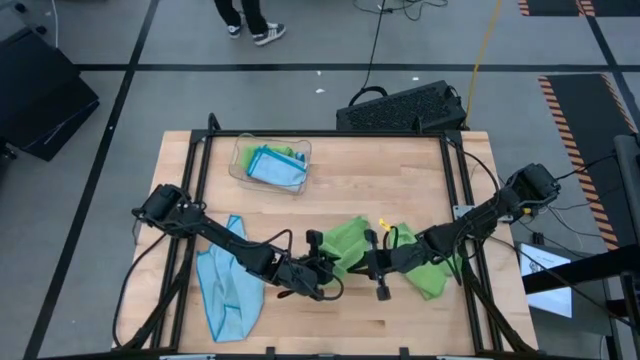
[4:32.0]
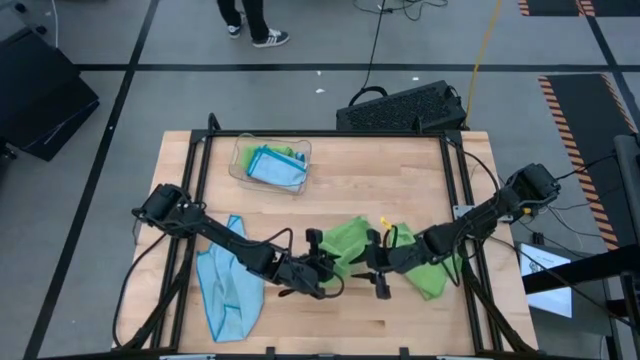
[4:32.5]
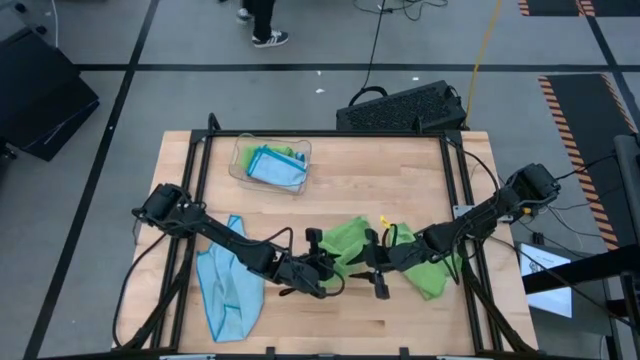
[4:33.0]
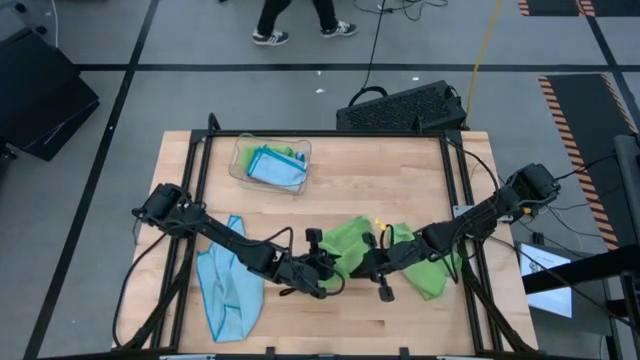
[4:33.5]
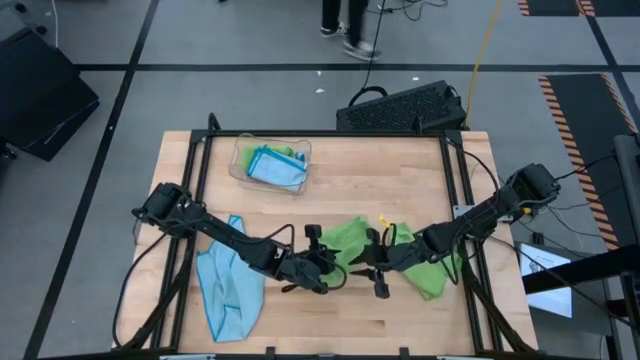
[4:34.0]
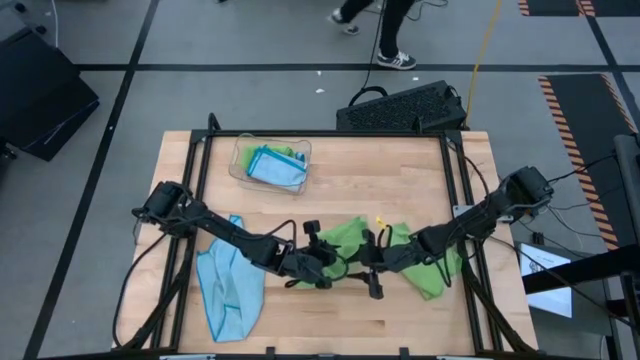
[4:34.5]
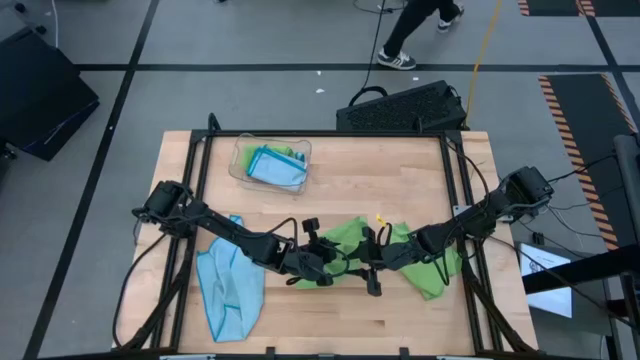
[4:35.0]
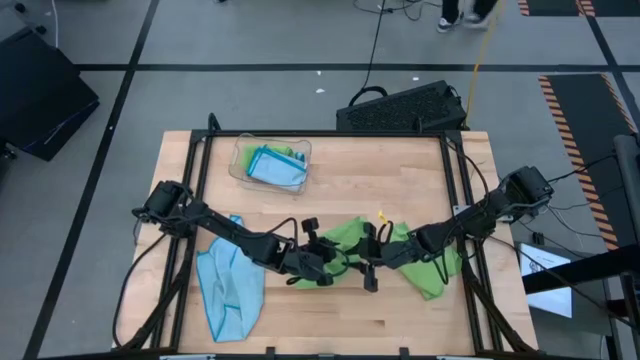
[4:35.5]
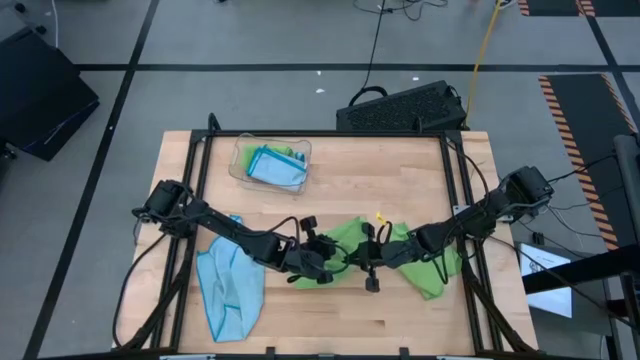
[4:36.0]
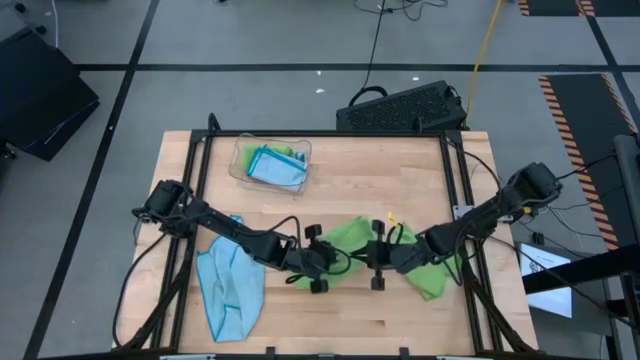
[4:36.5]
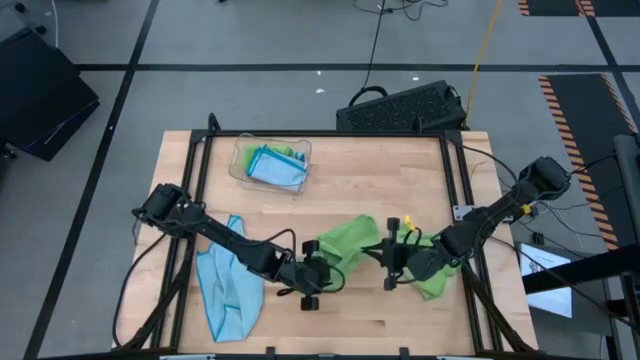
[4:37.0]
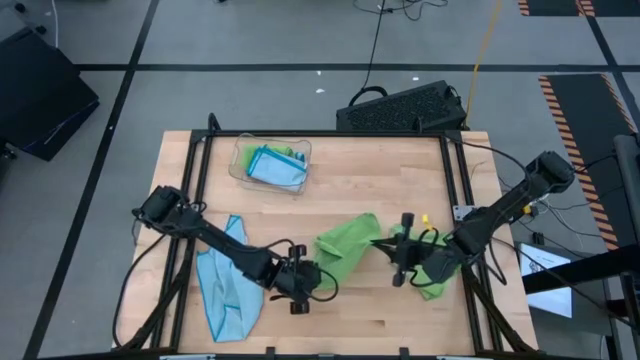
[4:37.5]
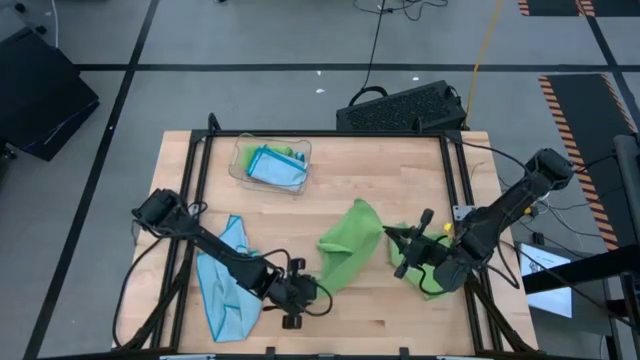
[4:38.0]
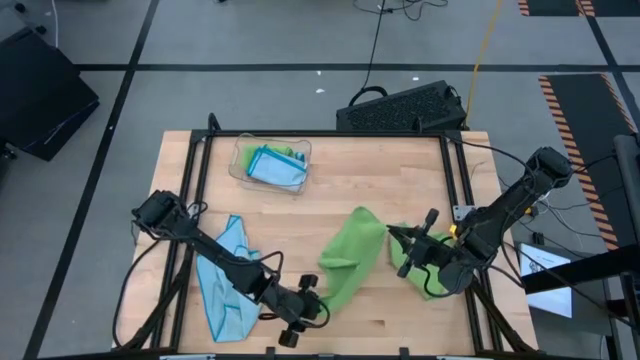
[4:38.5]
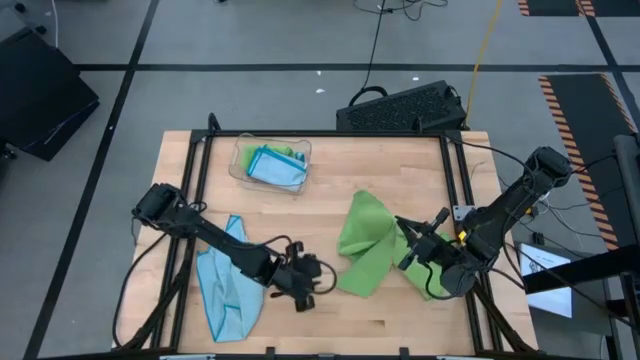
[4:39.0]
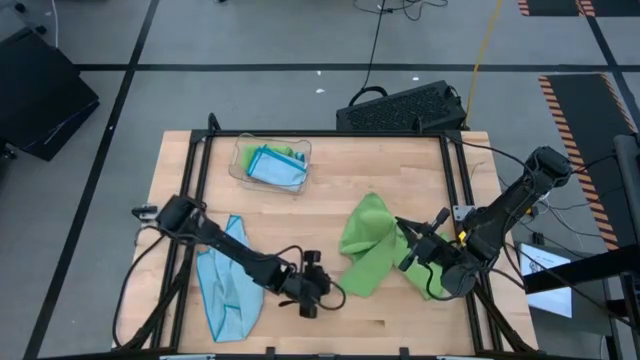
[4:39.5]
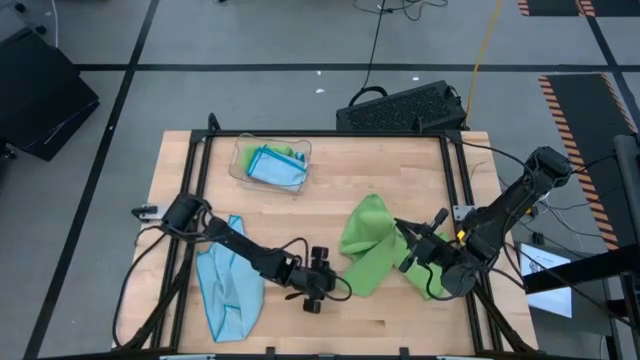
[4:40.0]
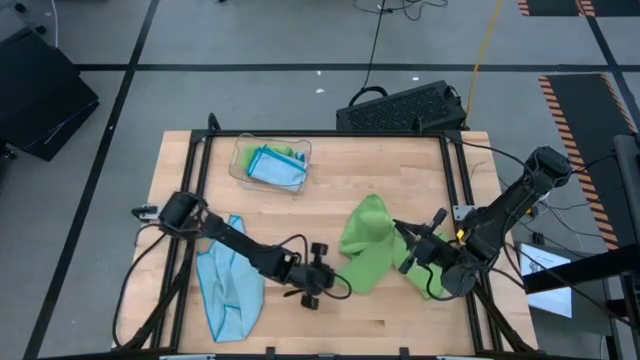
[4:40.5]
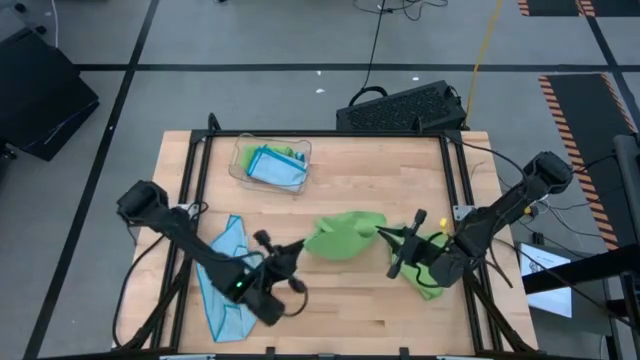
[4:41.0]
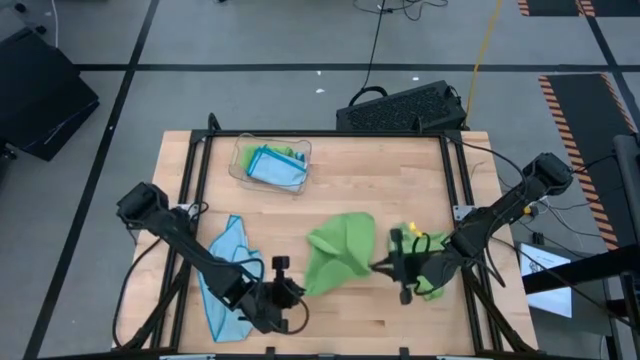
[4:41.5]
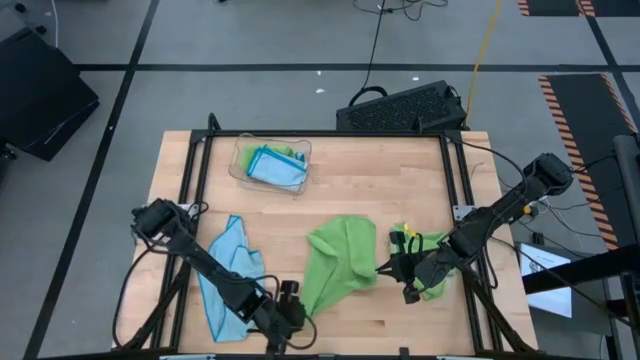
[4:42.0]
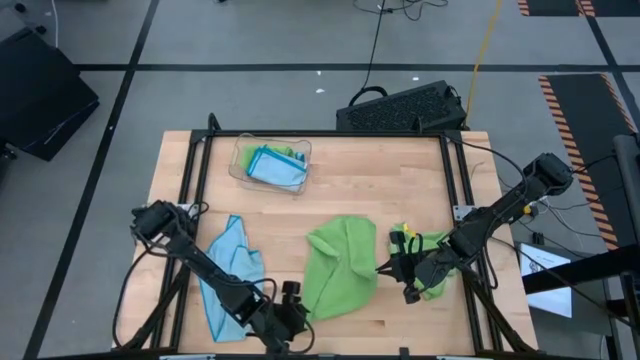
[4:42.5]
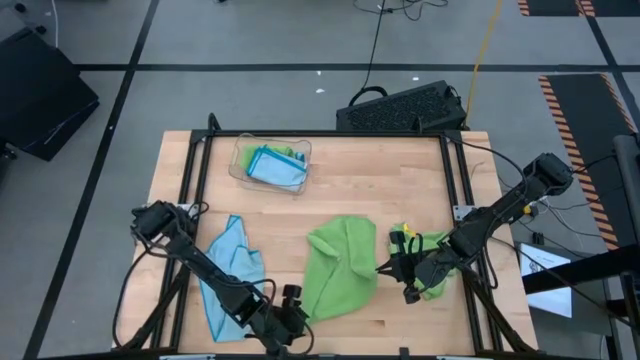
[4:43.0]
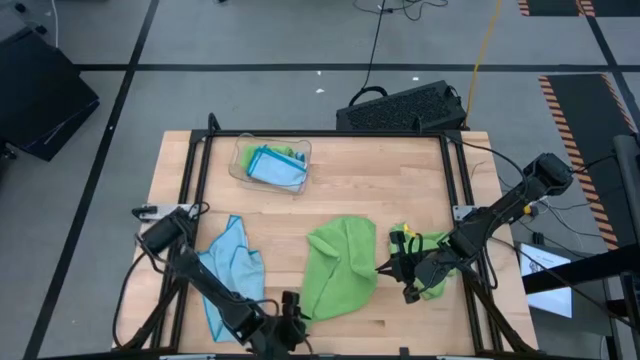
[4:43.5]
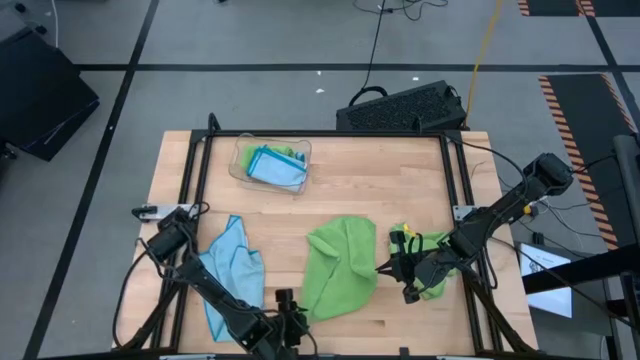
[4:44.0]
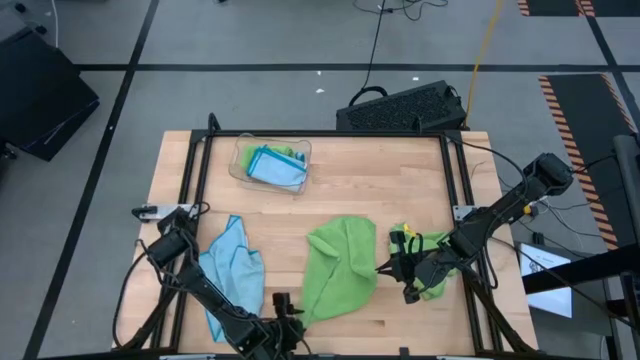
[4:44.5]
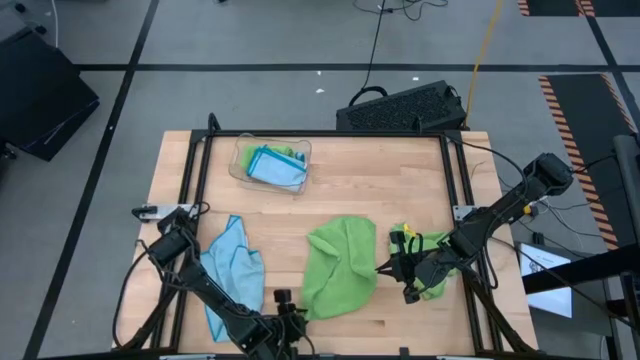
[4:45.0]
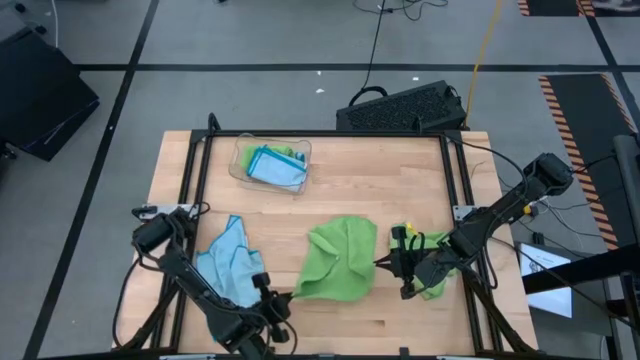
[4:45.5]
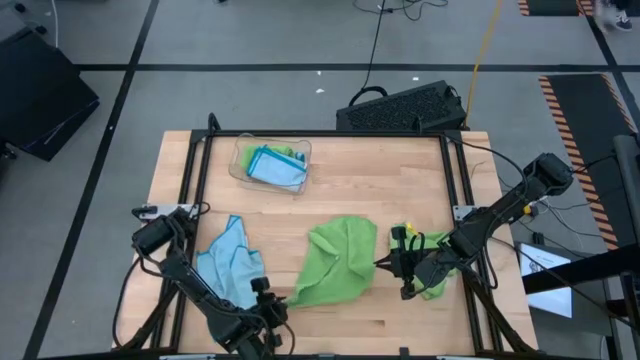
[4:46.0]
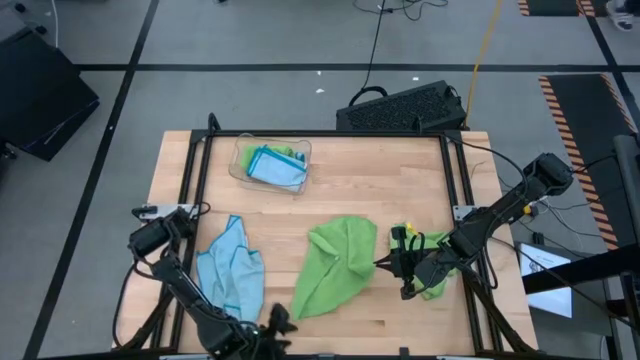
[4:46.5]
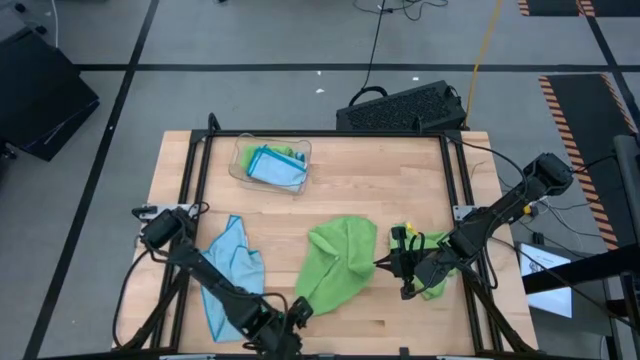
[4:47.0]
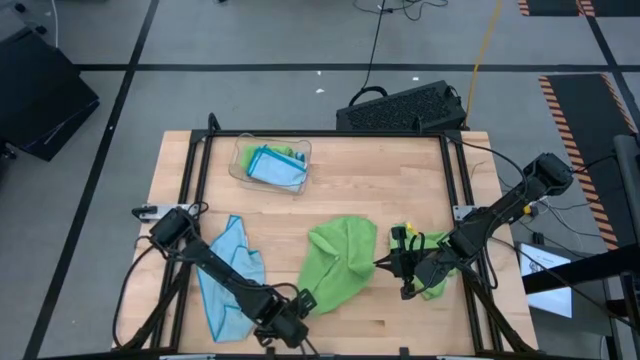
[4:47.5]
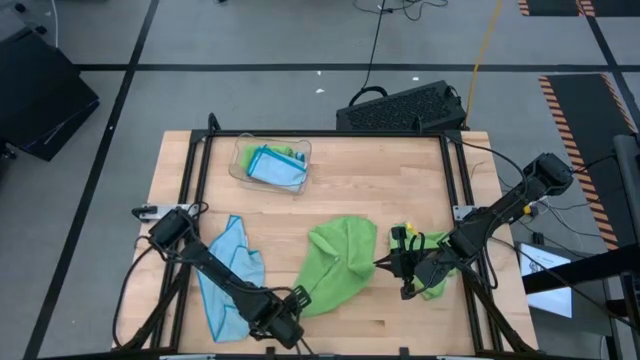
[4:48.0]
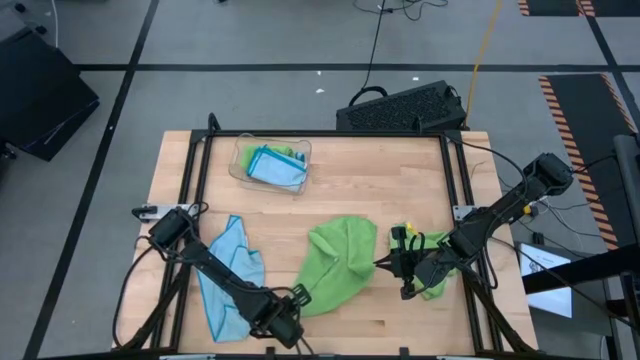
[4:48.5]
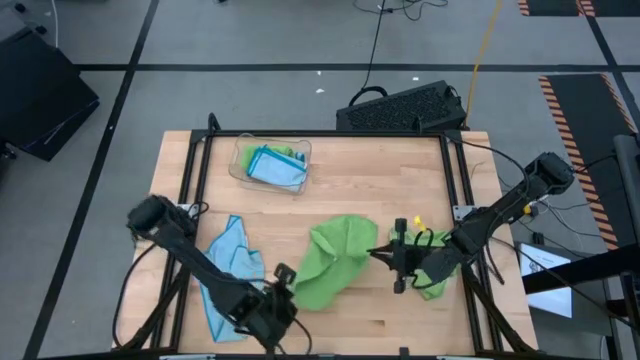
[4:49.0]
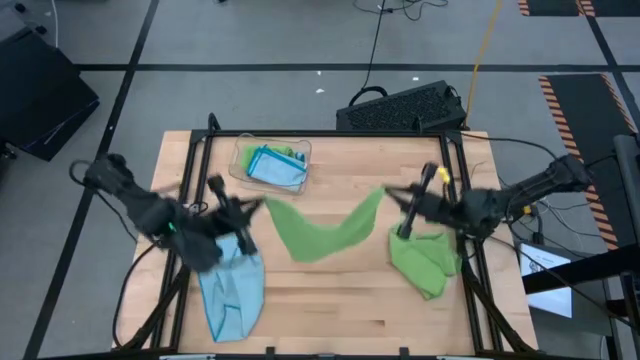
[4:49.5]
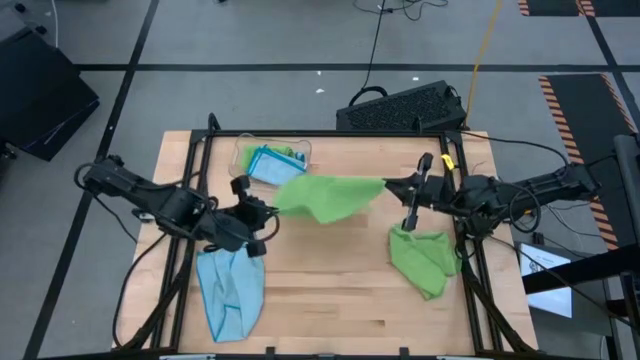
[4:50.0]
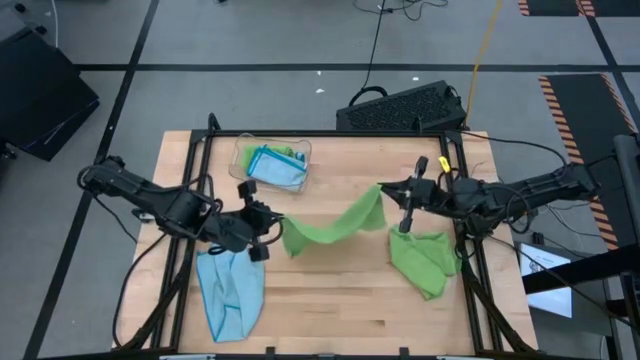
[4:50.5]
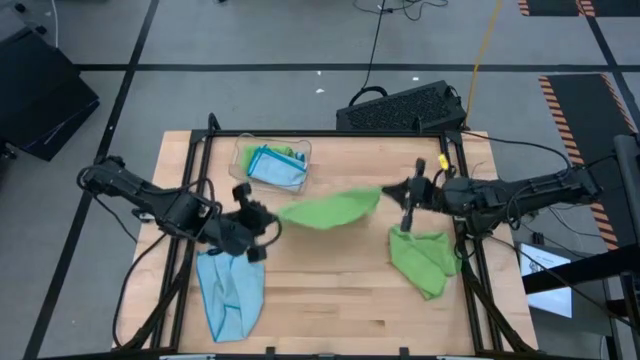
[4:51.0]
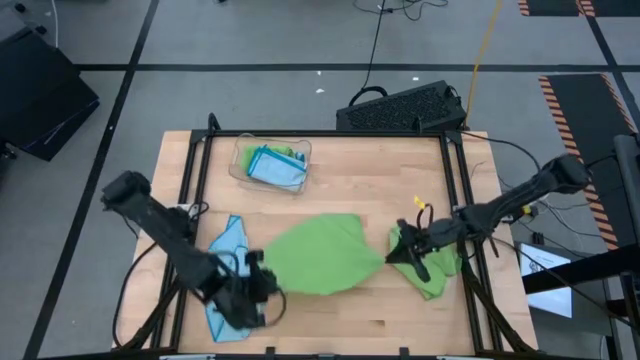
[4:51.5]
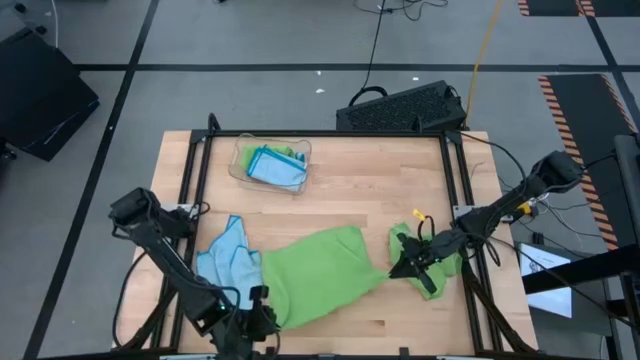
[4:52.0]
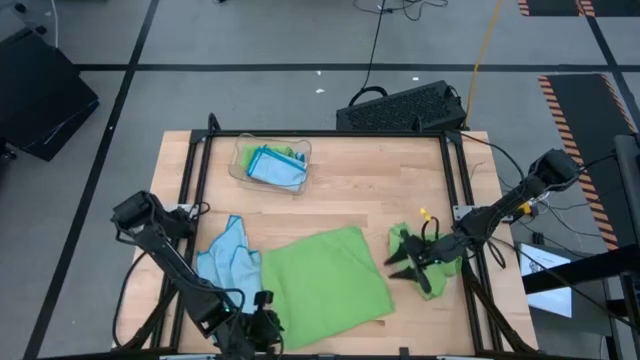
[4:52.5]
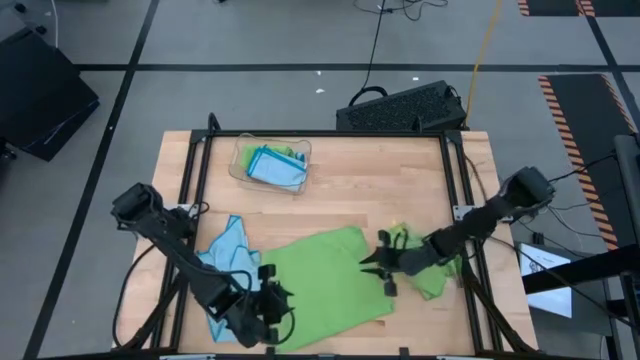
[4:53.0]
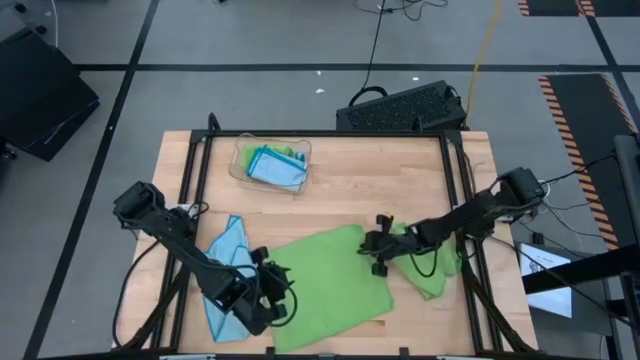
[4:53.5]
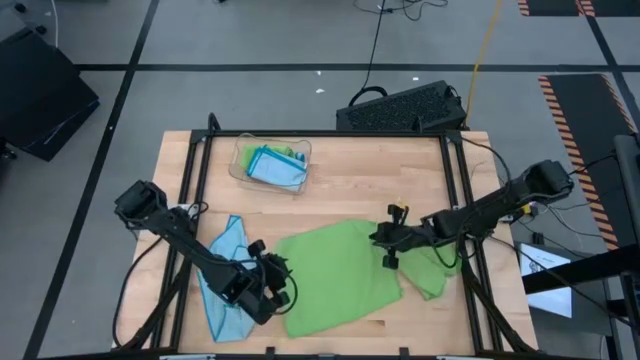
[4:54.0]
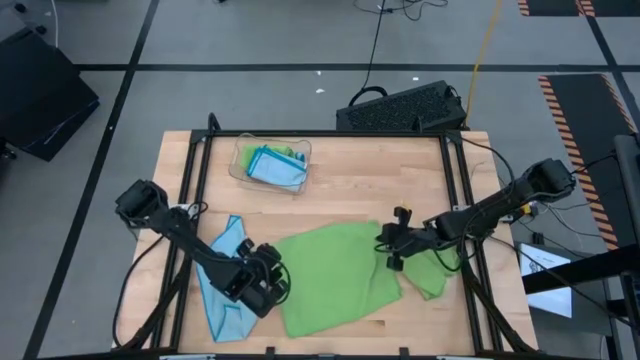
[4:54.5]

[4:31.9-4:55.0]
Task: Fold microfiber towels
Fold the top green microfiber cloth
